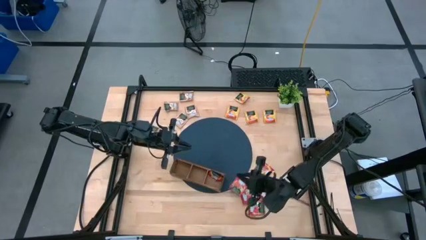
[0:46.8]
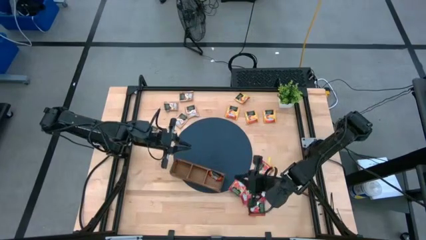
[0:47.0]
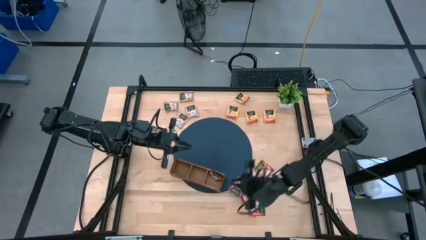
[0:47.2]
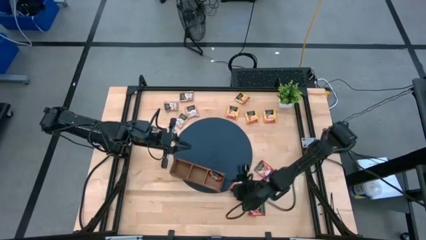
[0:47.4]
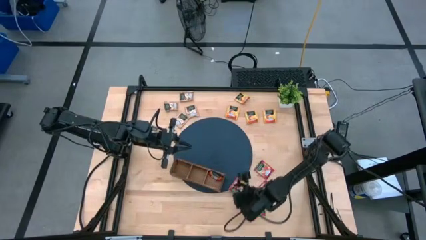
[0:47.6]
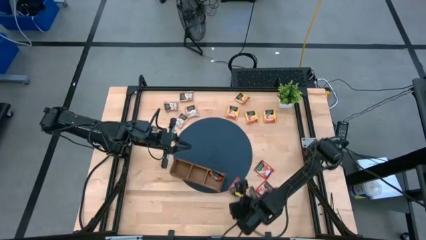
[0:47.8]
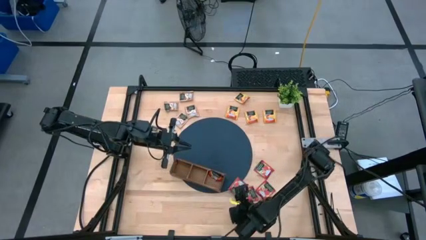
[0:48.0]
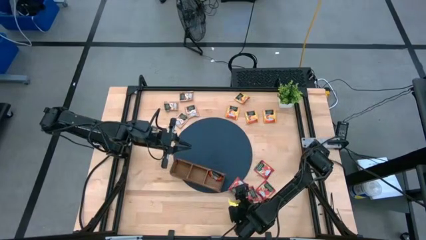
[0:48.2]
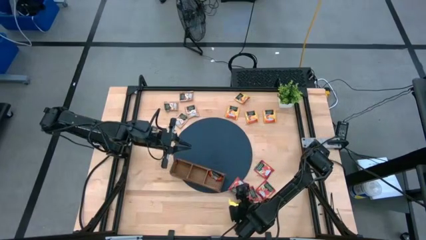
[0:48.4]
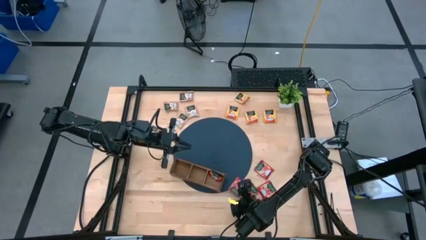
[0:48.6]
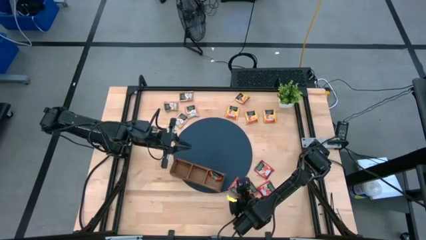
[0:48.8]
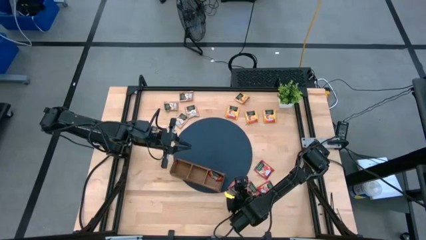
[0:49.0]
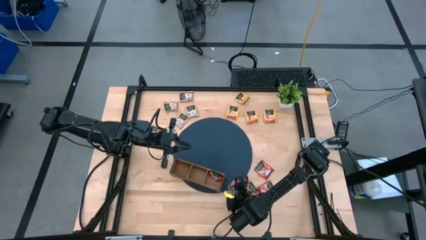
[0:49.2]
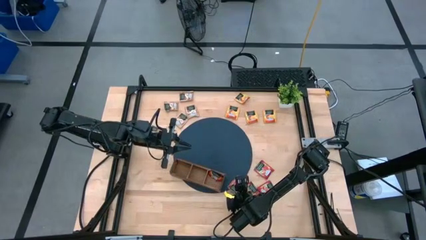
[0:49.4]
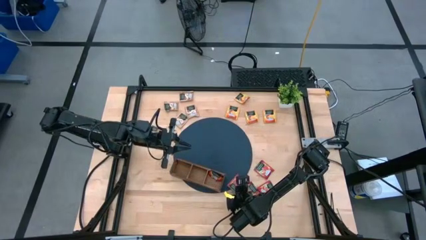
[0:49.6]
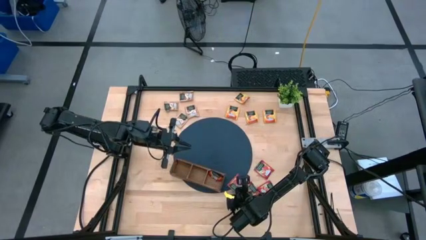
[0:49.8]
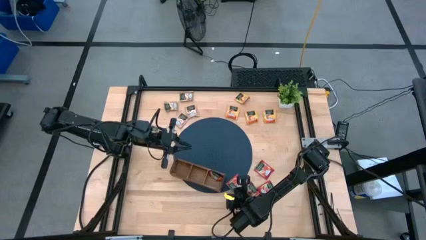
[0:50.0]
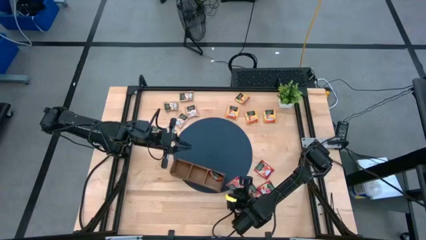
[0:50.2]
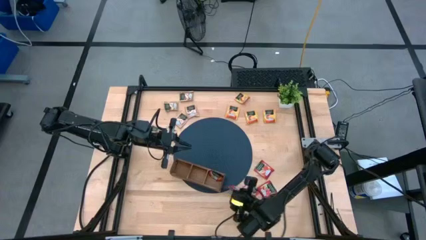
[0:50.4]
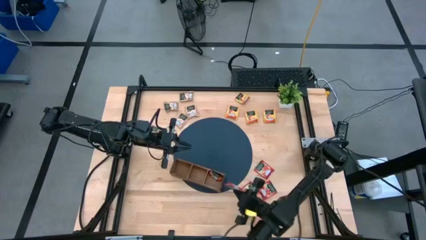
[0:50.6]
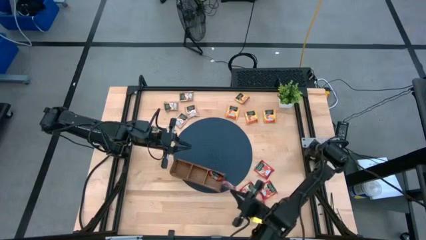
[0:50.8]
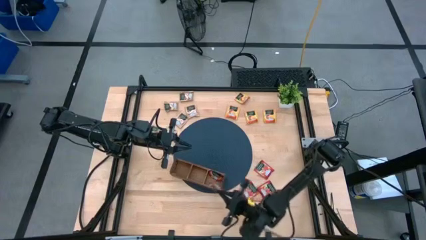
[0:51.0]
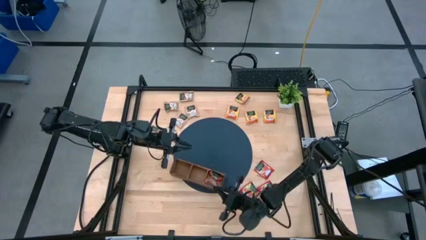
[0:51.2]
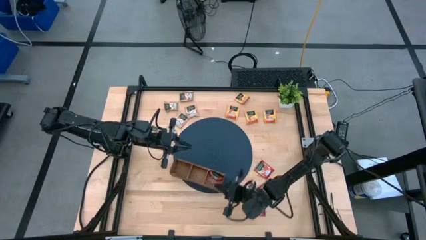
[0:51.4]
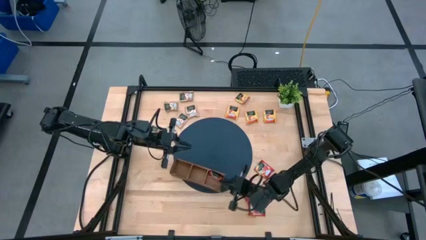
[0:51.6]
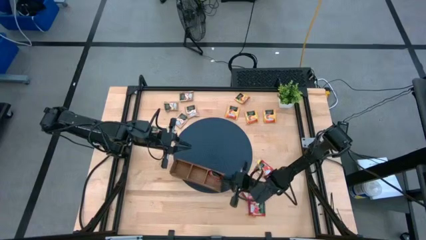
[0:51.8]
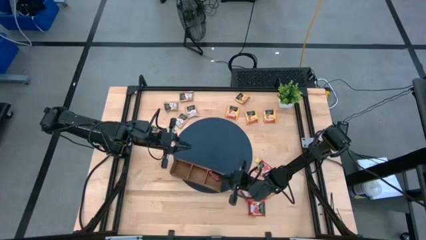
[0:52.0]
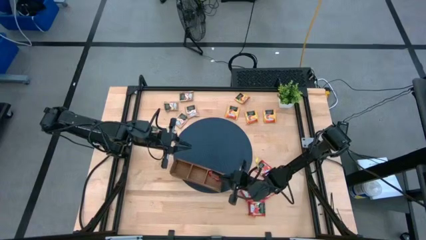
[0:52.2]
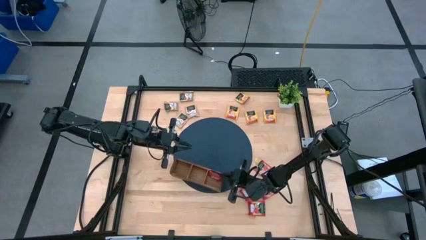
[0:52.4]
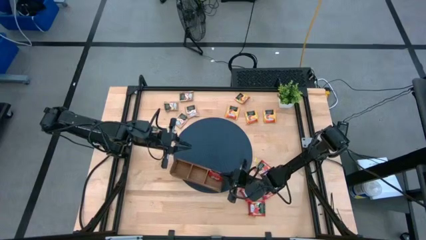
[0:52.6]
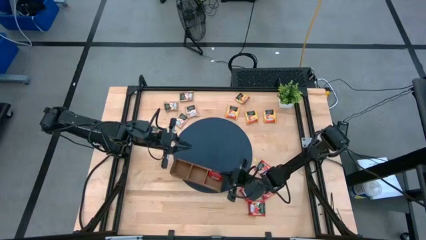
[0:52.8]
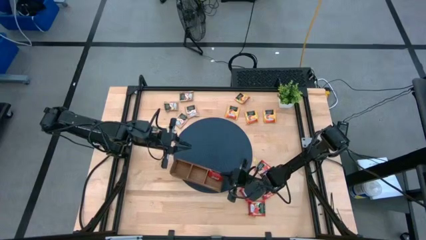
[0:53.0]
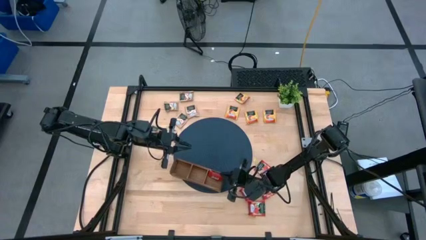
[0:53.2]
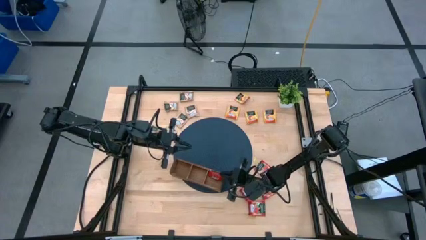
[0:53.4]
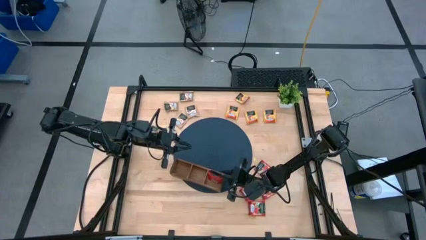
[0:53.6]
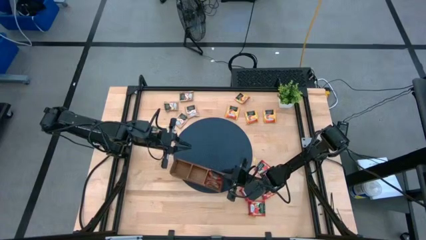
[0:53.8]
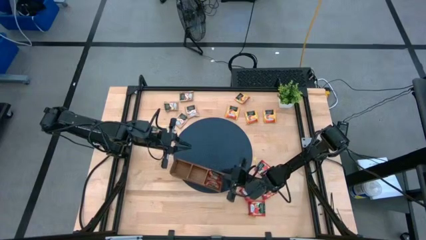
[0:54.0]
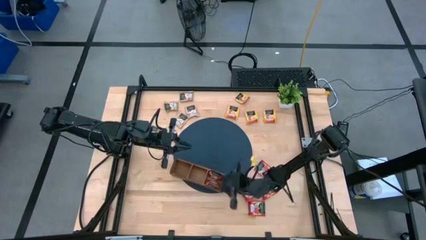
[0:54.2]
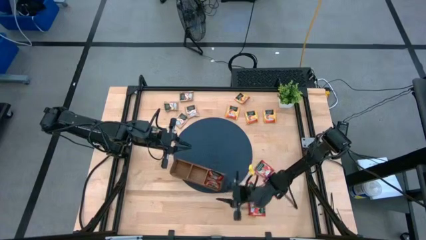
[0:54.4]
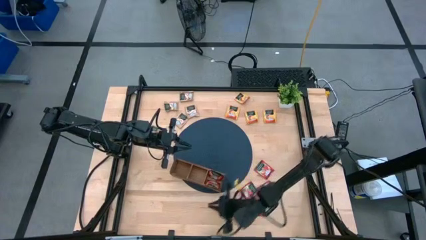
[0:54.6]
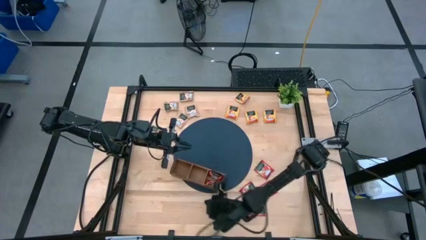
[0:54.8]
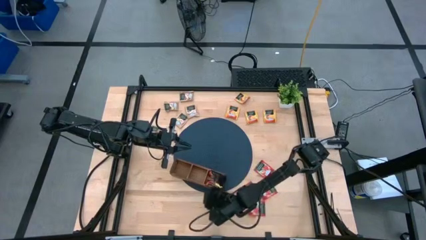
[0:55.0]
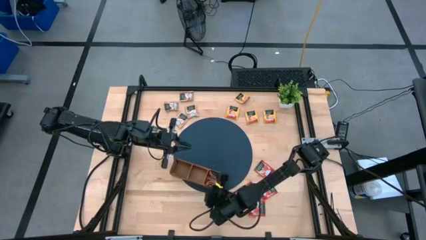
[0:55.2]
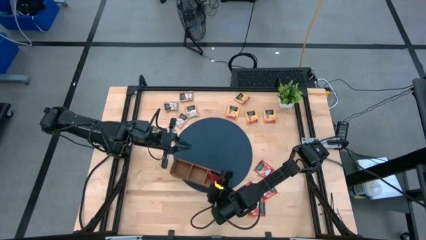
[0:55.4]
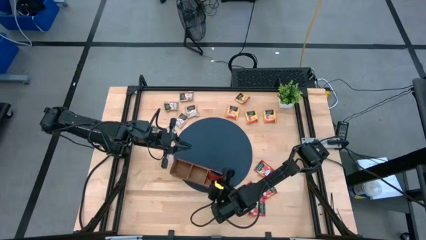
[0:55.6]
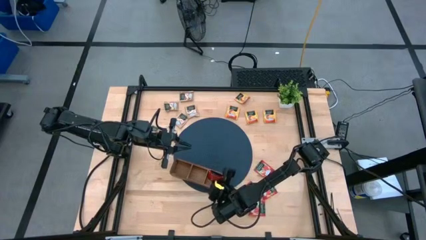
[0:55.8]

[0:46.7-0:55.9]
Task: Pick & Place Tea
Put the red tea bag into the right section of the wooden organizer

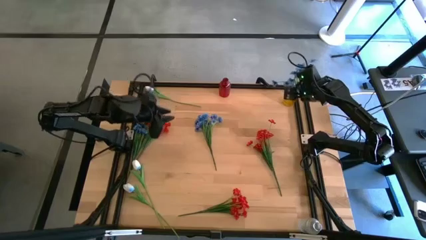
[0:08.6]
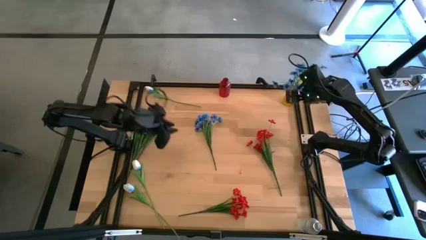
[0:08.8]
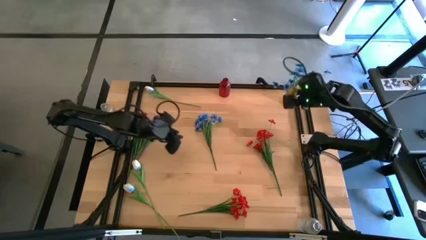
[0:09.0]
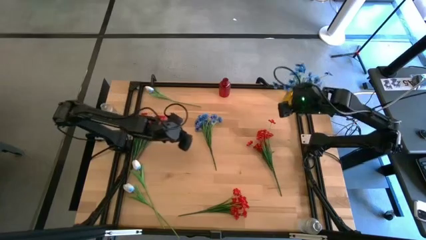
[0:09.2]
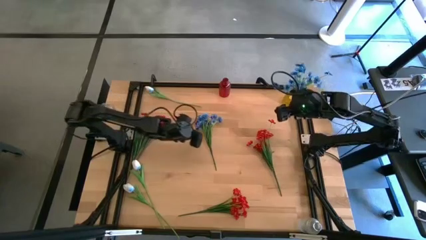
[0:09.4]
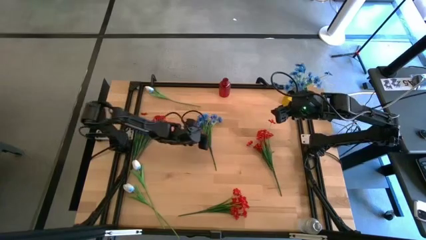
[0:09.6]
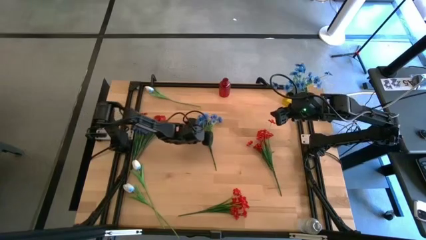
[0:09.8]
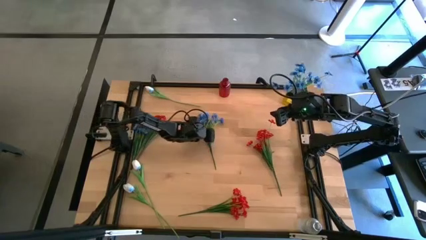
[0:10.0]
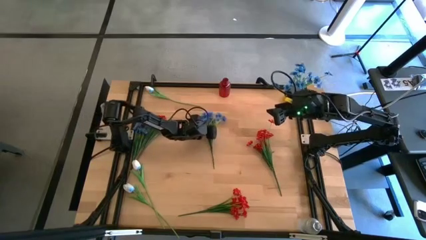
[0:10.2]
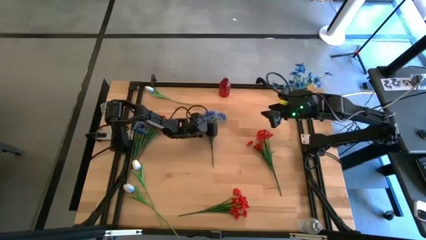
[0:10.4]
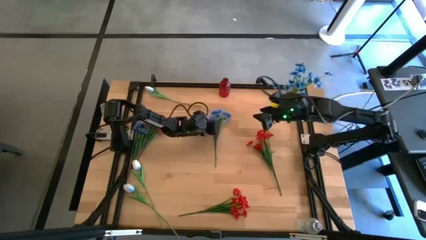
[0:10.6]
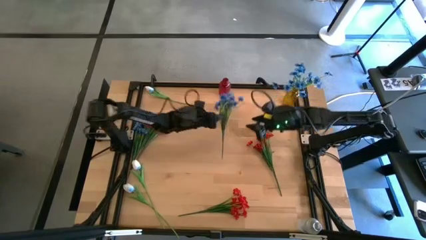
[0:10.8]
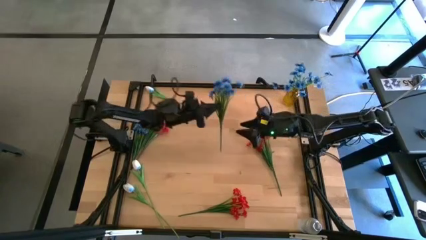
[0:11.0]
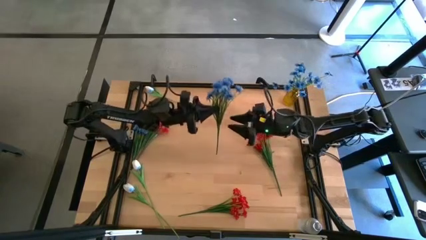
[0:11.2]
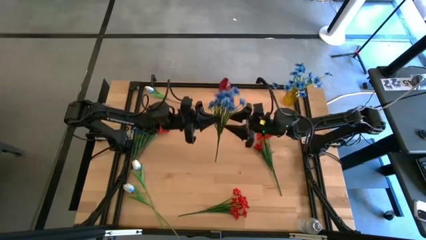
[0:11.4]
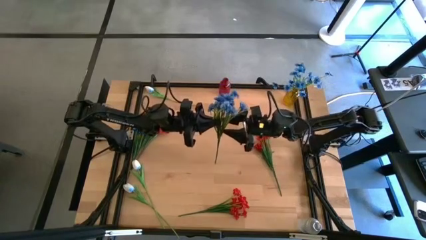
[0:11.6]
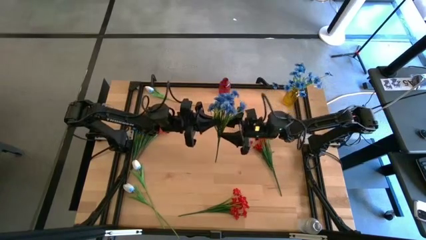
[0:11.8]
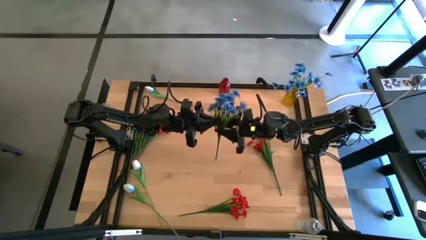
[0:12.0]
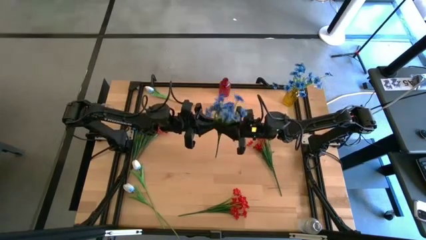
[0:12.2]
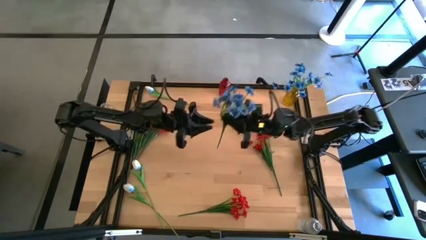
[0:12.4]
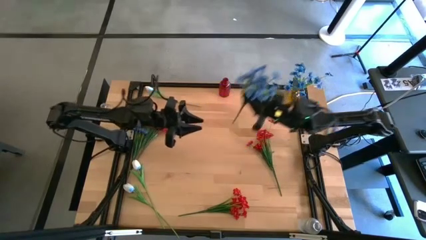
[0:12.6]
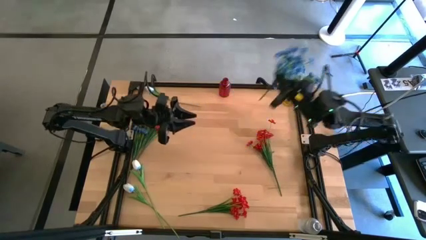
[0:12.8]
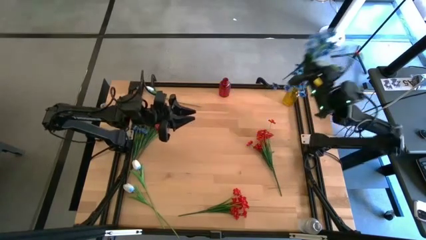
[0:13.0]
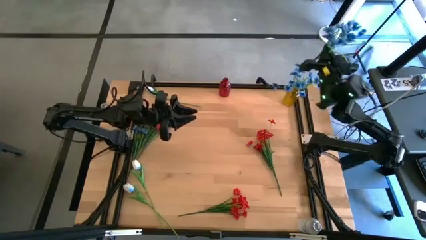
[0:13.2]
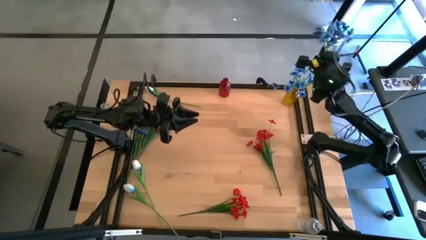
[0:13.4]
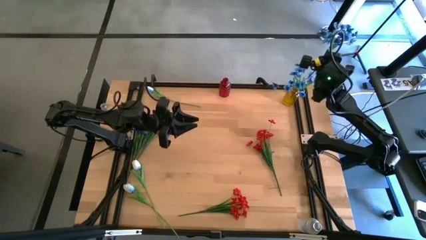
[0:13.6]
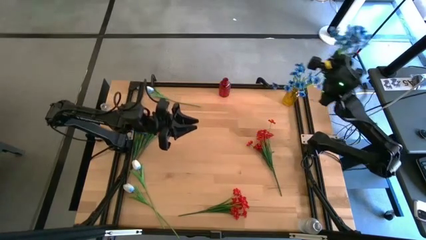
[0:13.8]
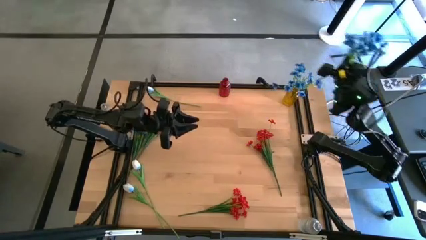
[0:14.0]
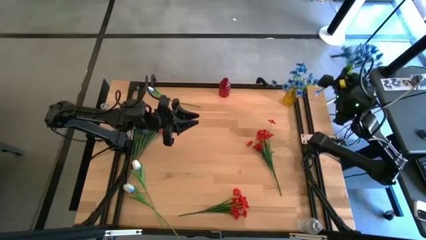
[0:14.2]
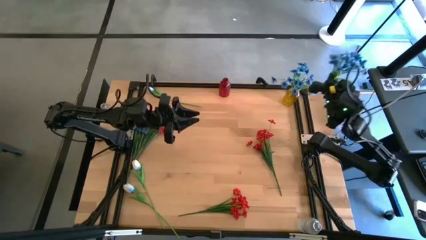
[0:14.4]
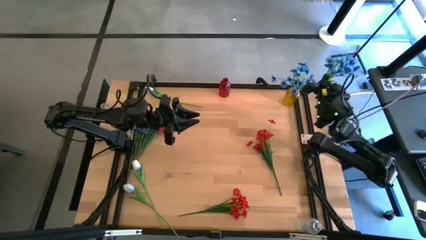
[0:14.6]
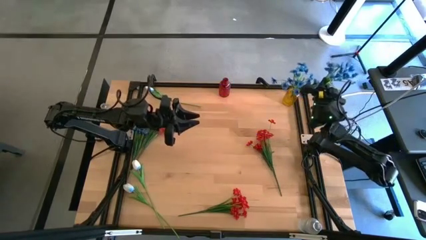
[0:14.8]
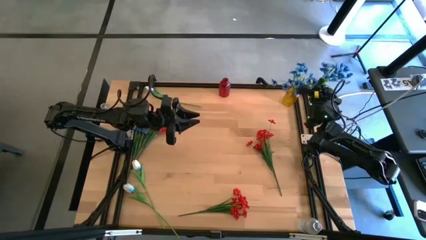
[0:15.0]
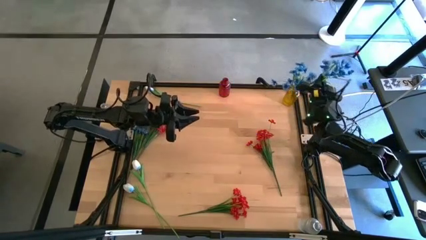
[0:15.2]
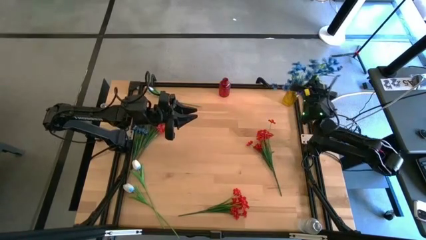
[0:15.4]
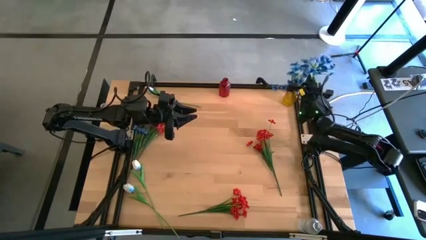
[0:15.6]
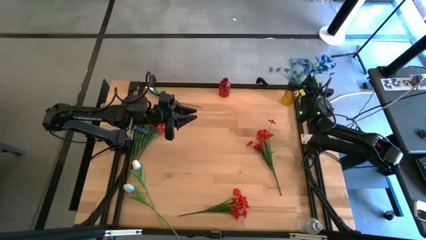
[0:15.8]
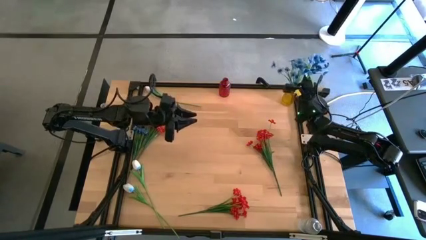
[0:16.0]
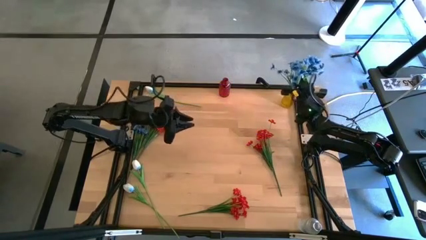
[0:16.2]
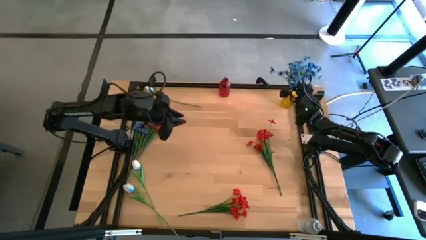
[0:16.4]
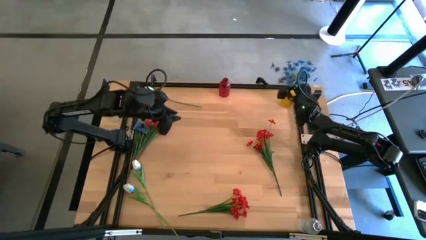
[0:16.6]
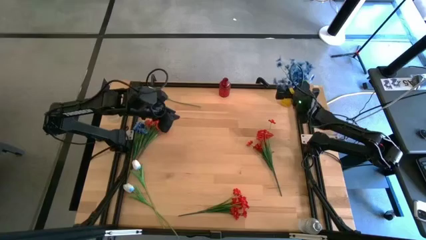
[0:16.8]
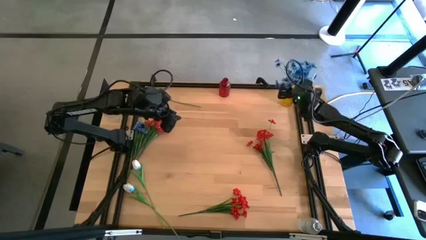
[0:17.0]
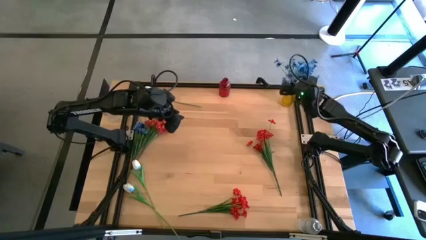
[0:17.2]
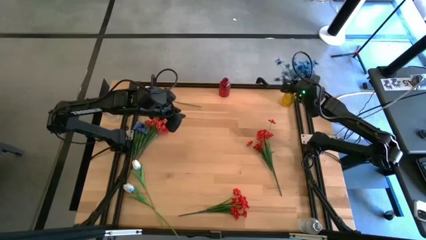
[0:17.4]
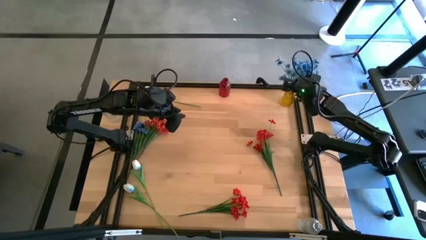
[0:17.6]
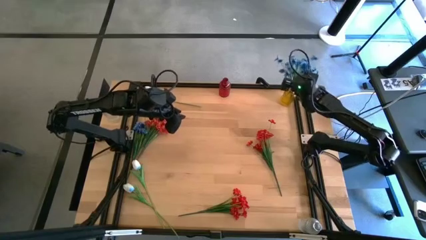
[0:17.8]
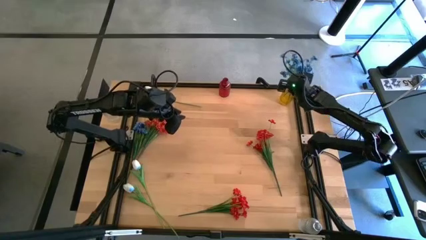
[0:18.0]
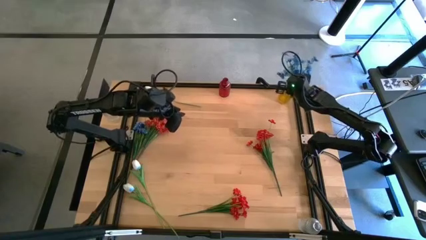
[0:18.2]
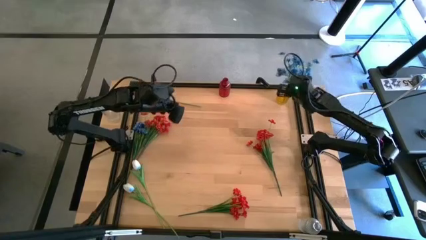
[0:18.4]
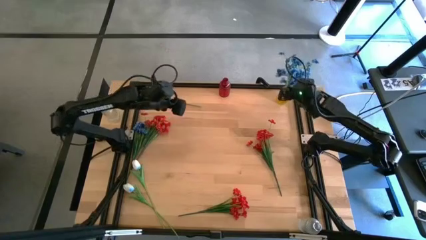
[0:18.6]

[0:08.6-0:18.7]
Task: Sort flowers into vase by color
Put the right blue flowers into the yellow vase
